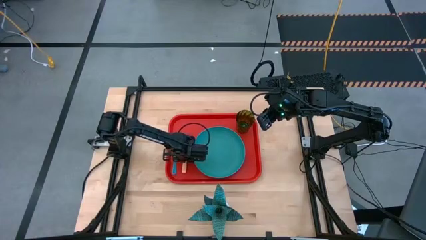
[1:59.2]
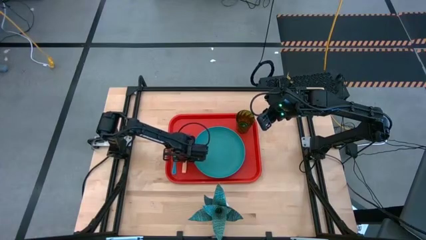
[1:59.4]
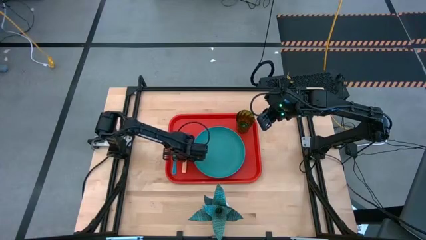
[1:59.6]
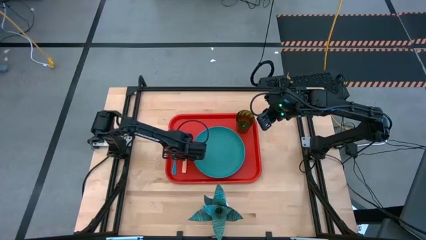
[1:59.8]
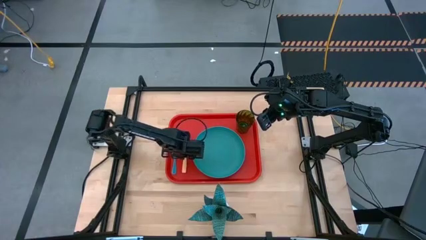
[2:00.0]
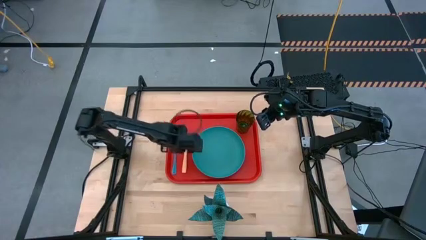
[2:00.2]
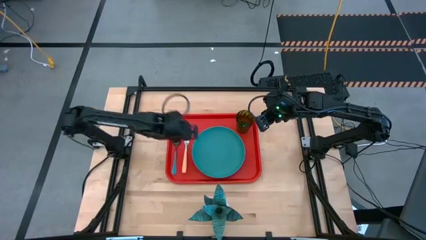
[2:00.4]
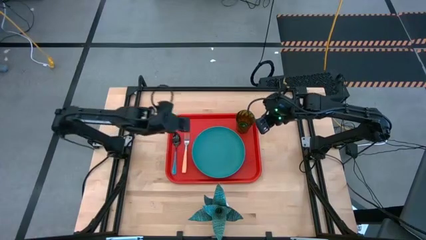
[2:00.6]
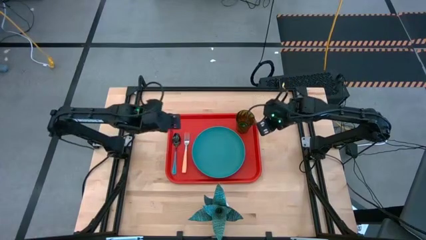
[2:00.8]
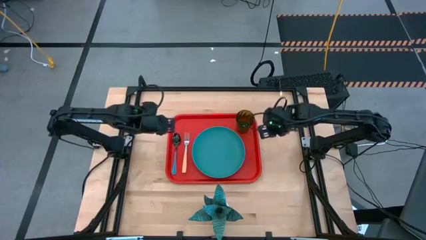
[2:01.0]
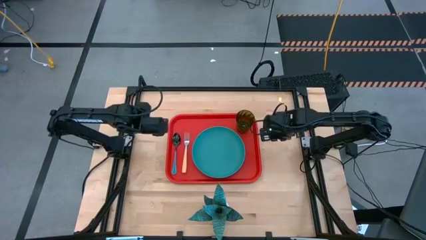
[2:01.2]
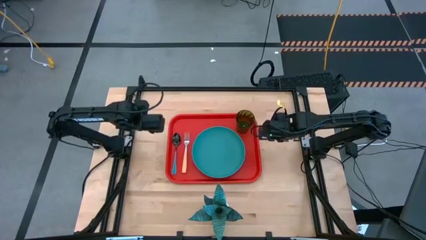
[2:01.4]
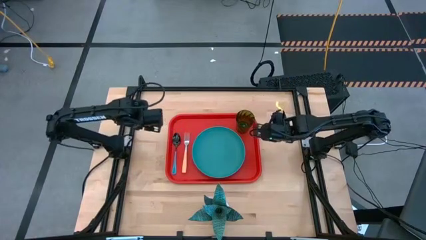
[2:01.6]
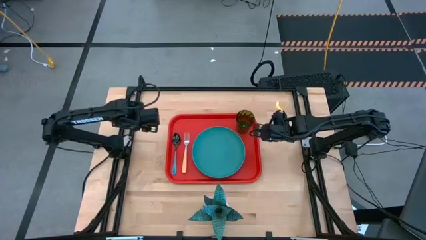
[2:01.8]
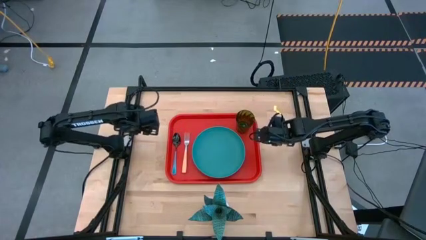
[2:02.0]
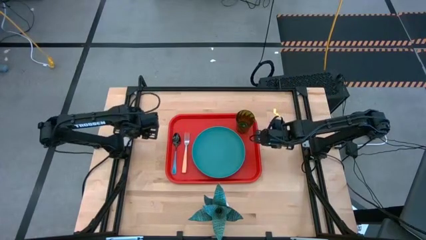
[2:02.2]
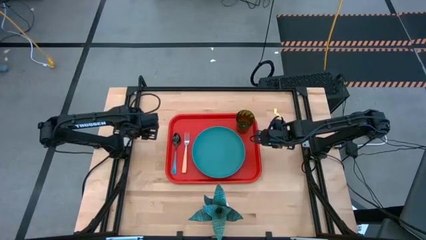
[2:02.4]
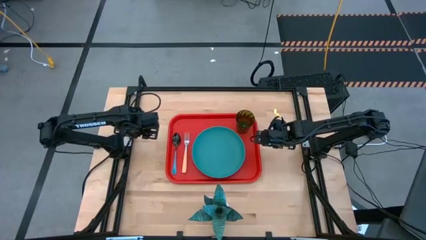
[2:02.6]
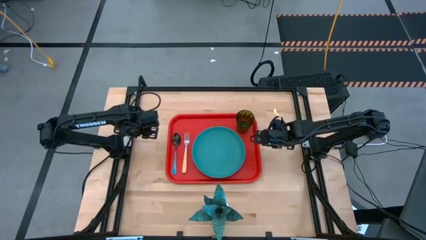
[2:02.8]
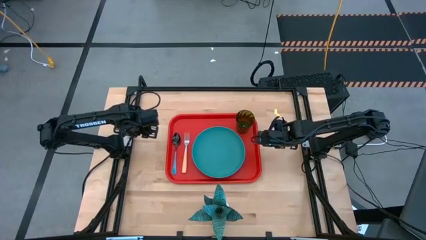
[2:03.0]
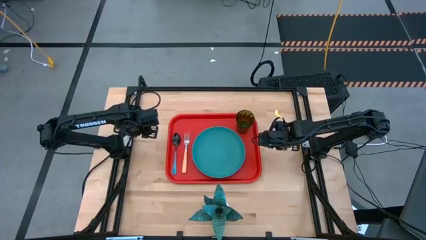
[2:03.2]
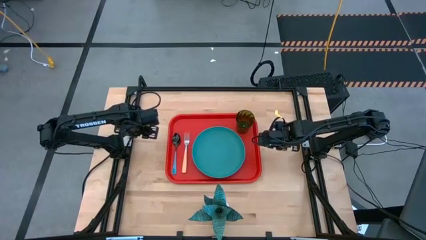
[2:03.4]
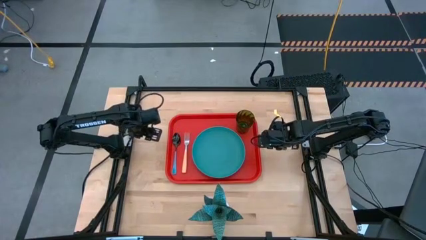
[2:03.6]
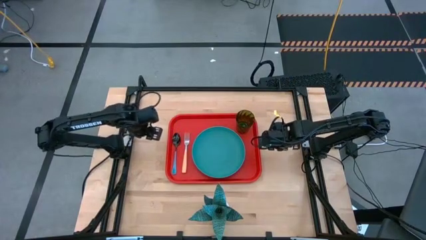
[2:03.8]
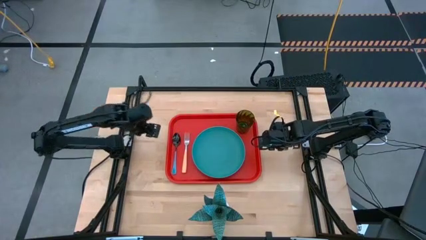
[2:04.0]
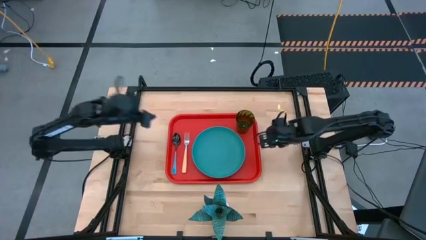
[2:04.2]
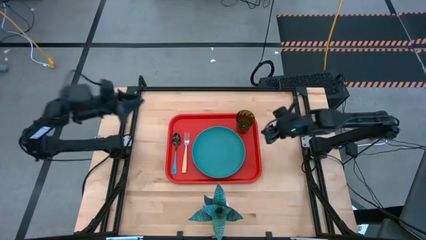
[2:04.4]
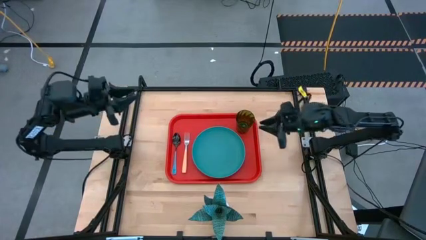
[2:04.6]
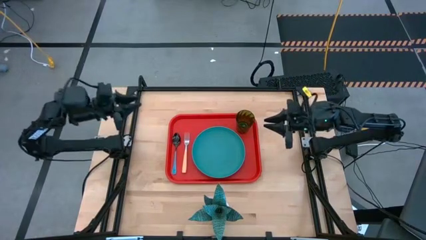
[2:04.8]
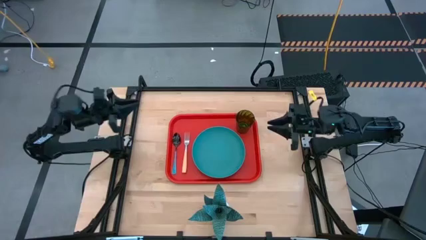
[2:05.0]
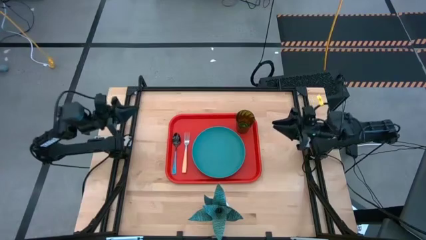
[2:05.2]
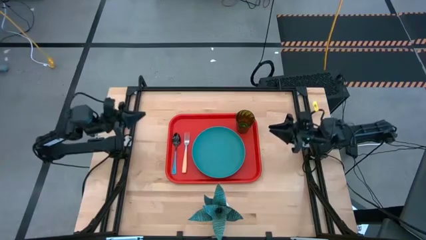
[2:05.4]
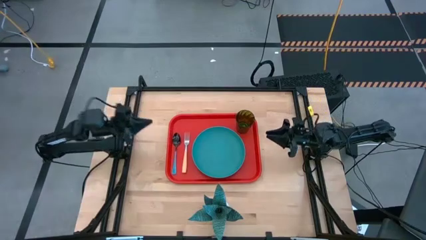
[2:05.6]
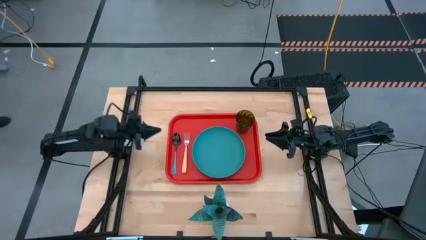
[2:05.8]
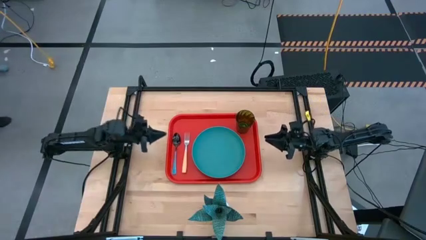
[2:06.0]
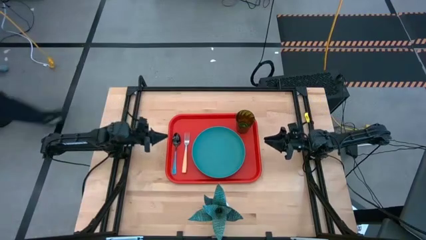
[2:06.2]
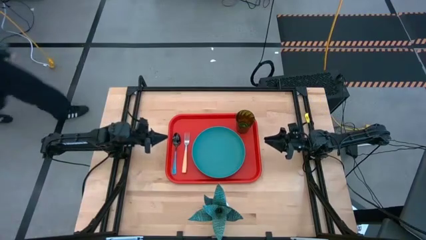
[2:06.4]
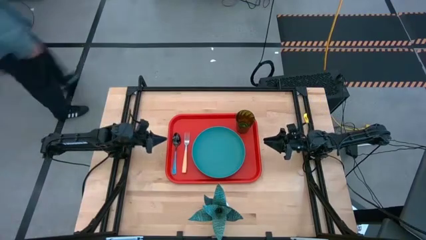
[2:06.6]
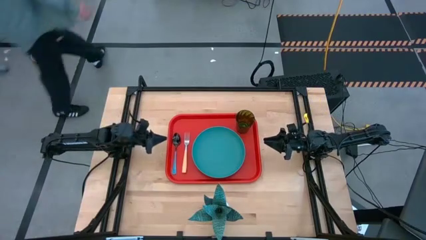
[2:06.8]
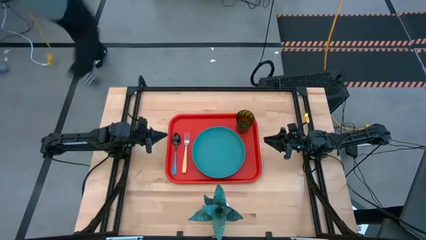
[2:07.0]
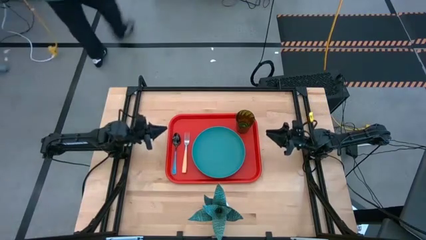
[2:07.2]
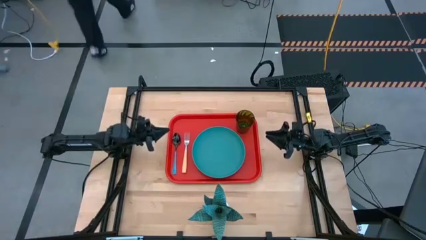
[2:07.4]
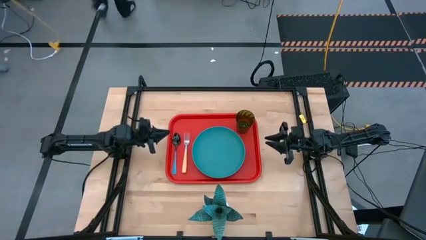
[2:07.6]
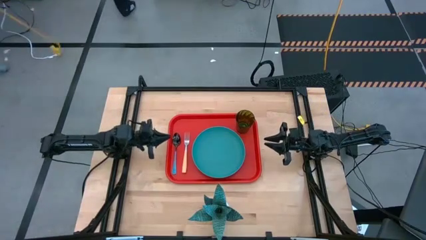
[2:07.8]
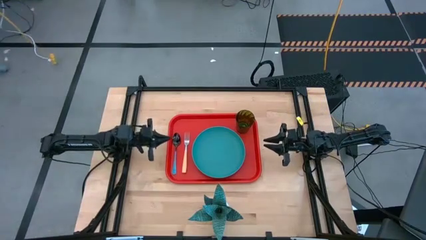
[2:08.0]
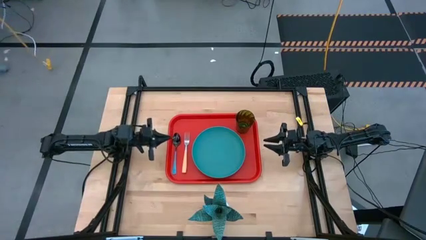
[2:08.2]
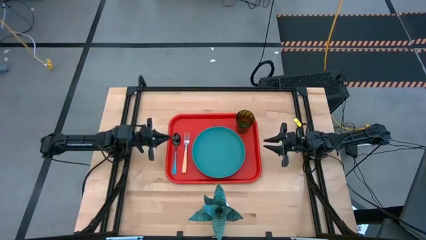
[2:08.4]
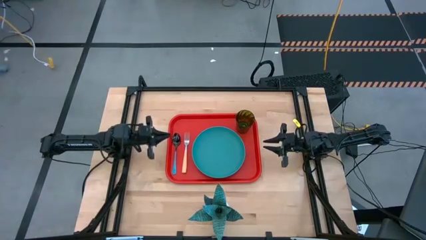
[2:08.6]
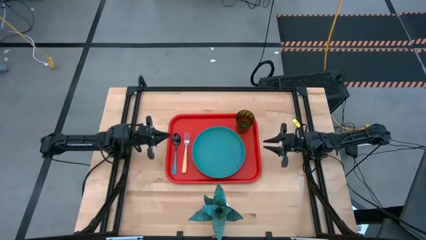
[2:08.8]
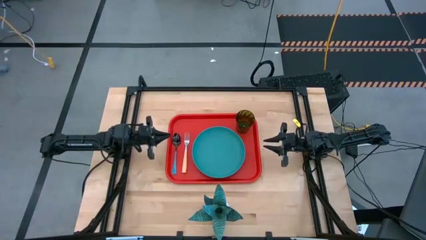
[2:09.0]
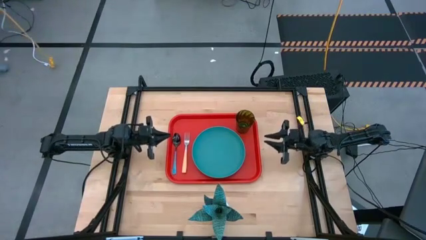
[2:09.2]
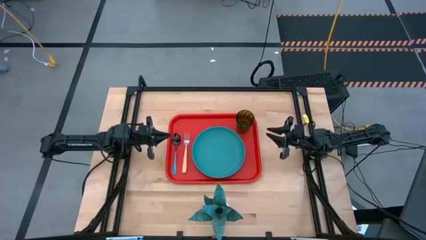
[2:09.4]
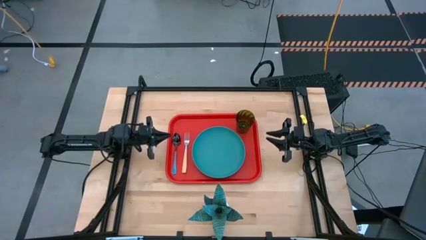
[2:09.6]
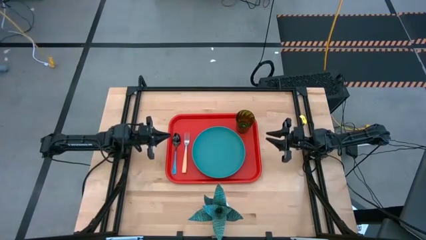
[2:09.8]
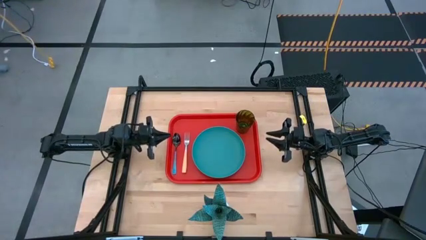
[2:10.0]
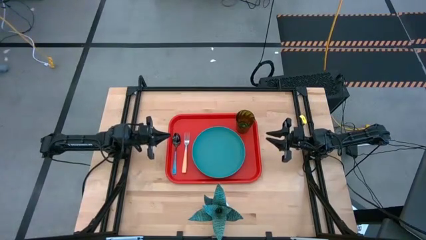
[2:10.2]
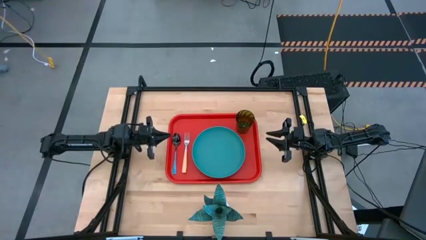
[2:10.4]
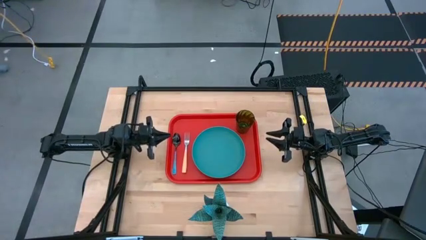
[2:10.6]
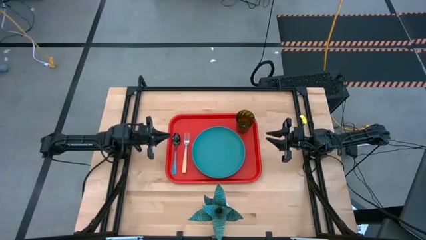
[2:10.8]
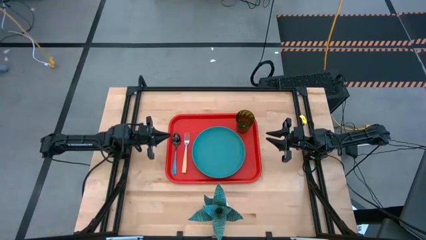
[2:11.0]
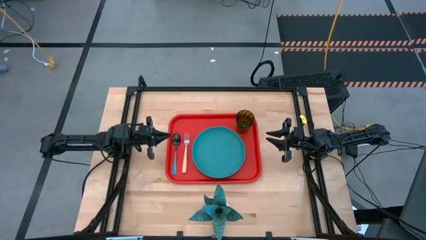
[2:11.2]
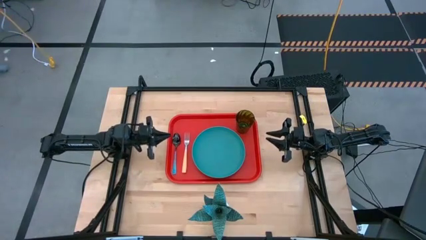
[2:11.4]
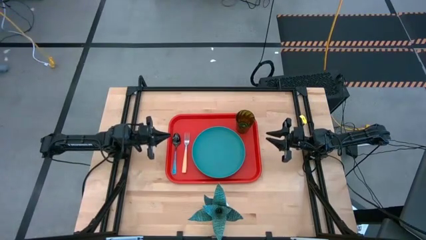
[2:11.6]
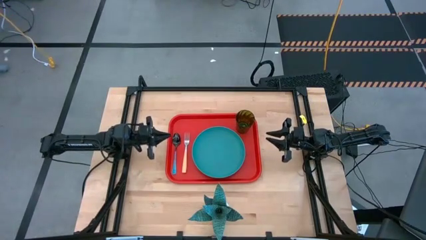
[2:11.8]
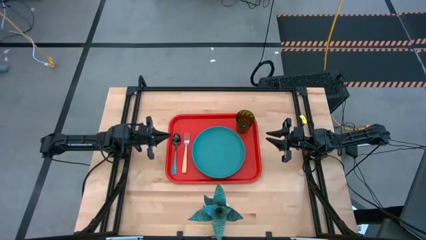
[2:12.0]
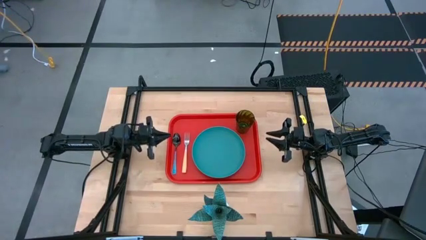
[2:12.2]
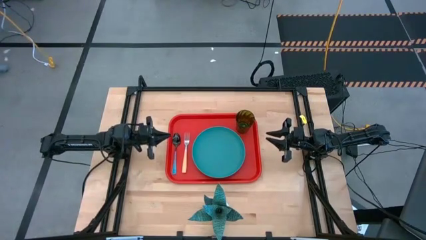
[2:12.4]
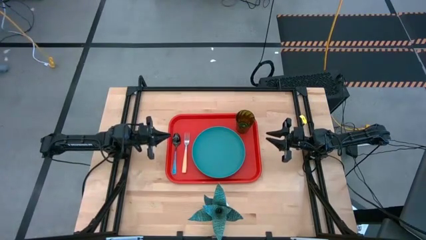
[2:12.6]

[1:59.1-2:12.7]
Task: Pick and place plate/cup/fork/spoon on tray
Return to home position

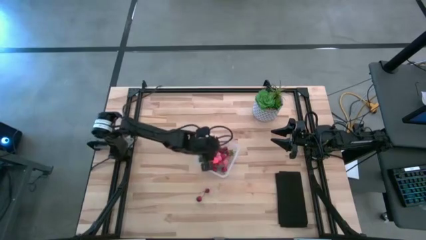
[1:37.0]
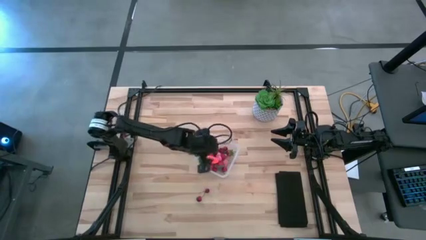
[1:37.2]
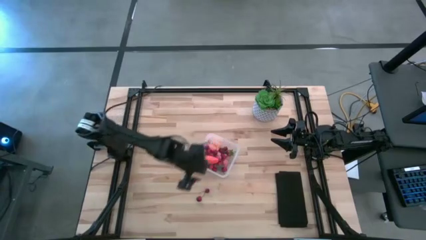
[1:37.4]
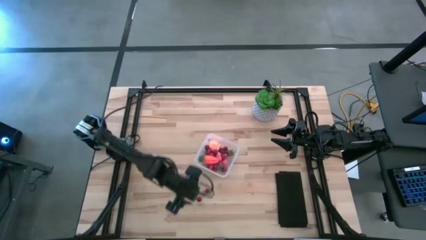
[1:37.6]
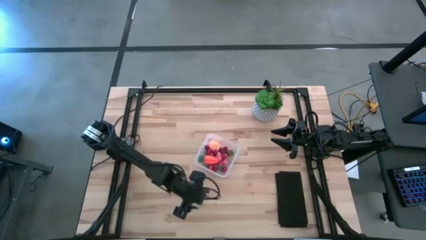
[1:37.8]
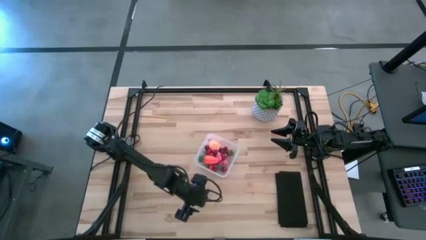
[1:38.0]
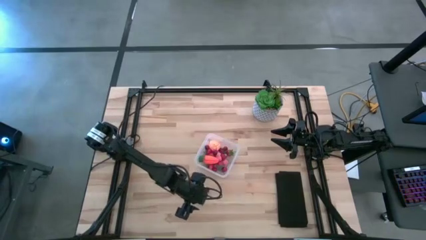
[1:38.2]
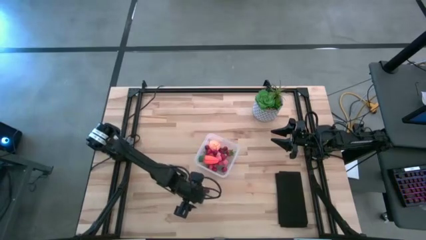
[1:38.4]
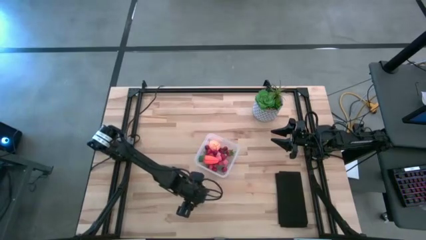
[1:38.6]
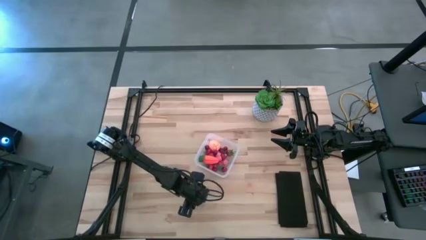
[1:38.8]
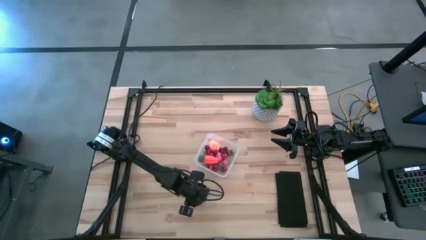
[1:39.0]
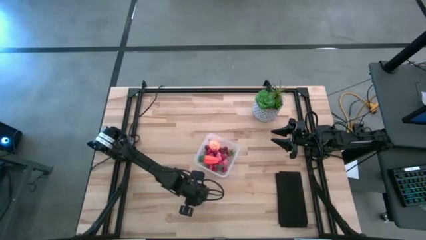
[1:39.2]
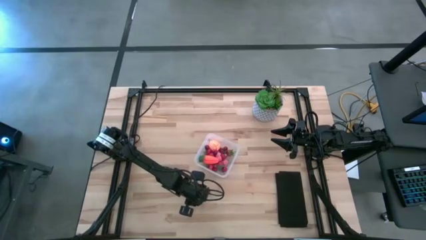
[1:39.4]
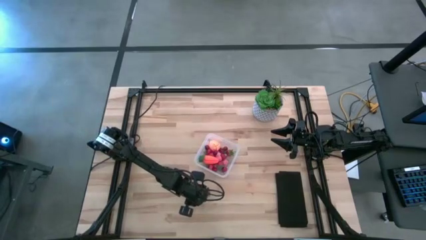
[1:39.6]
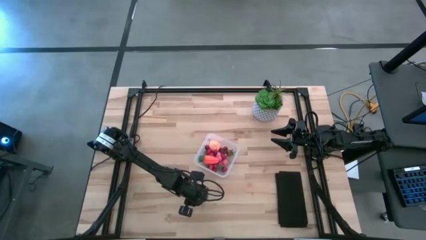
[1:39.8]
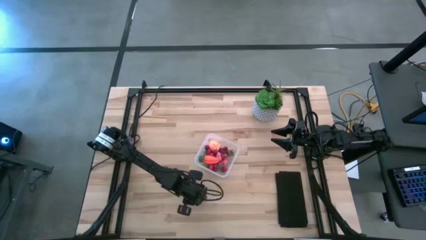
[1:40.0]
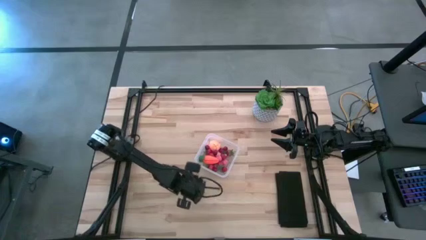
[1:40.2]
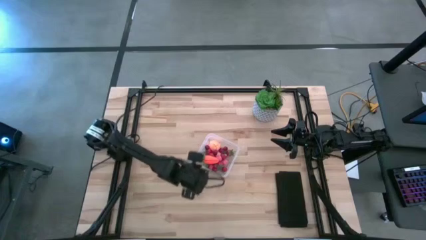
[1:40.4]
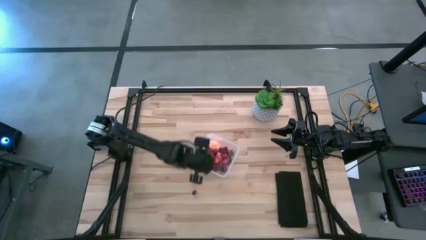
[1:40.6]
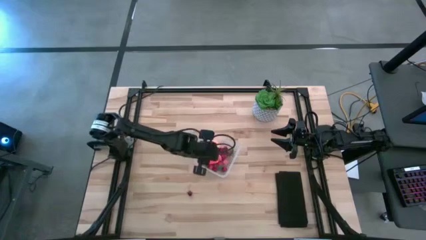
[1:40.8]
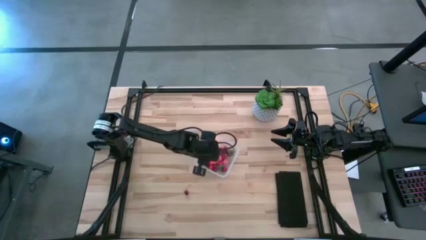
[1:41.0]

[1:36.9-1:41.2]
Task: Pick and placing Produce into tupperware
Put the red cherry into the transparent container
